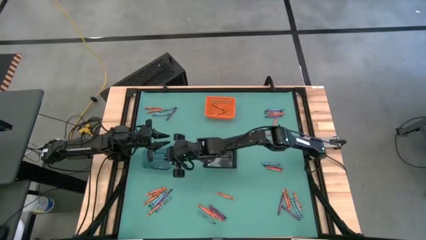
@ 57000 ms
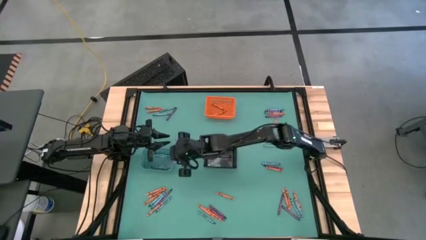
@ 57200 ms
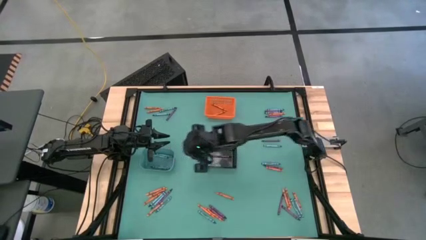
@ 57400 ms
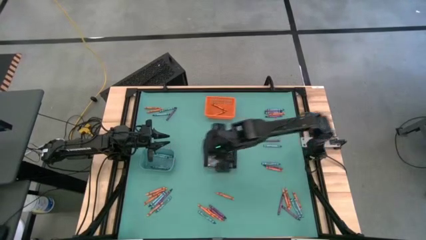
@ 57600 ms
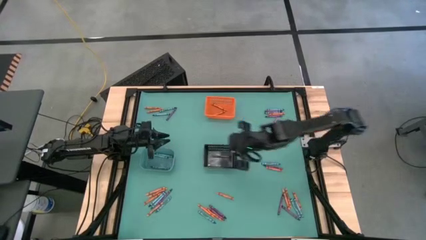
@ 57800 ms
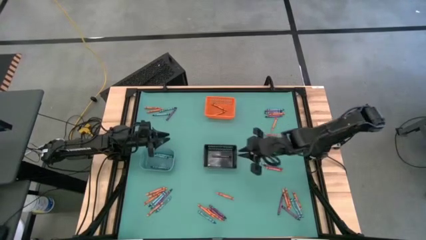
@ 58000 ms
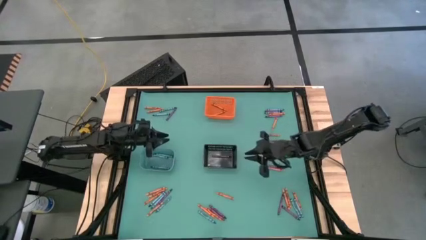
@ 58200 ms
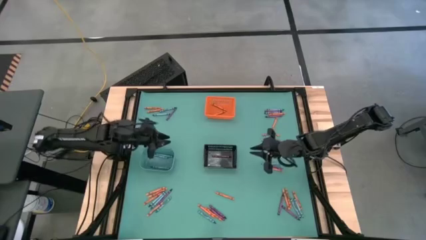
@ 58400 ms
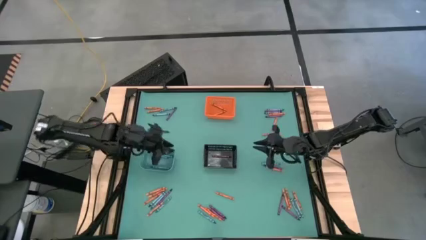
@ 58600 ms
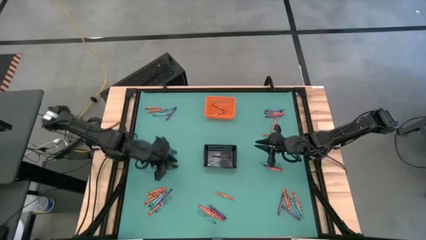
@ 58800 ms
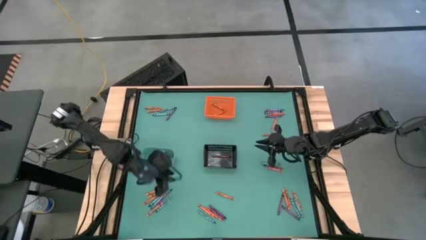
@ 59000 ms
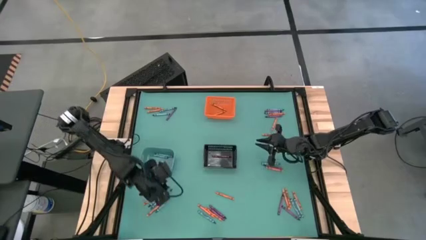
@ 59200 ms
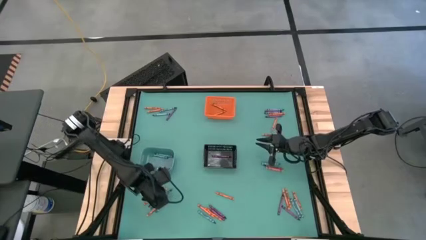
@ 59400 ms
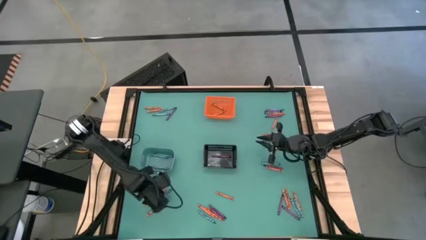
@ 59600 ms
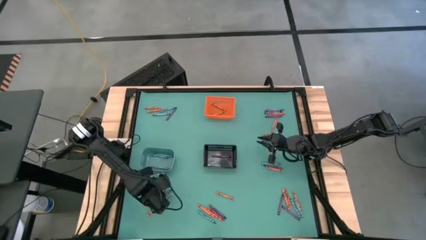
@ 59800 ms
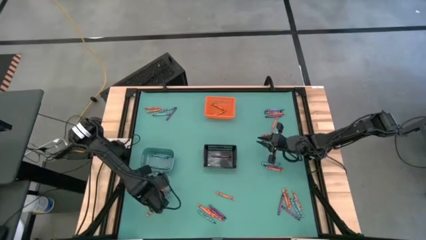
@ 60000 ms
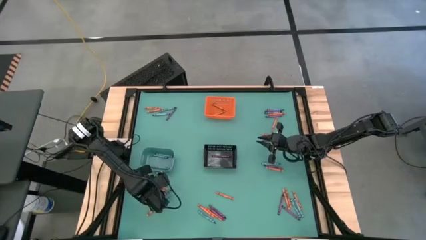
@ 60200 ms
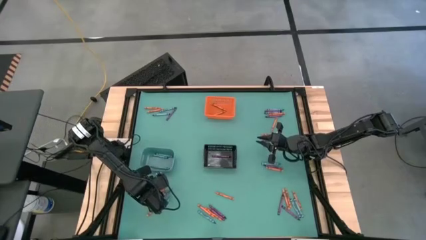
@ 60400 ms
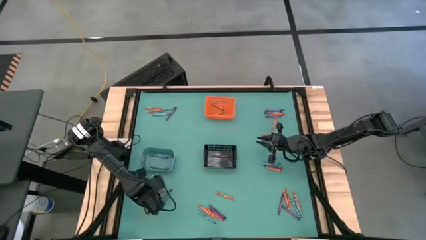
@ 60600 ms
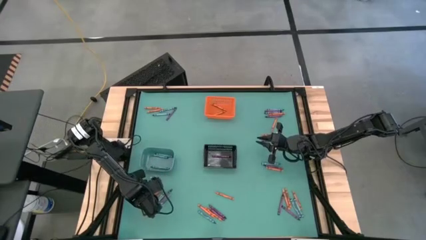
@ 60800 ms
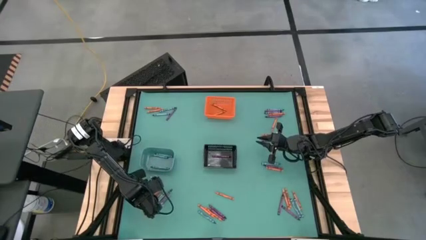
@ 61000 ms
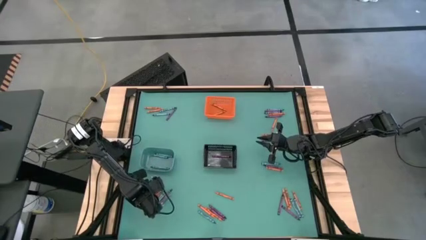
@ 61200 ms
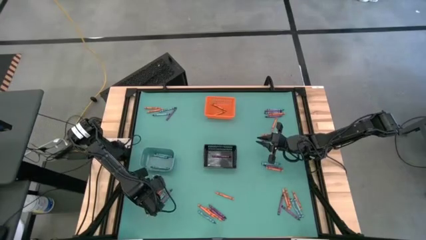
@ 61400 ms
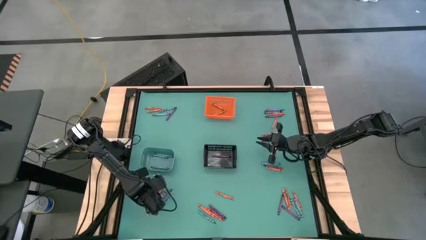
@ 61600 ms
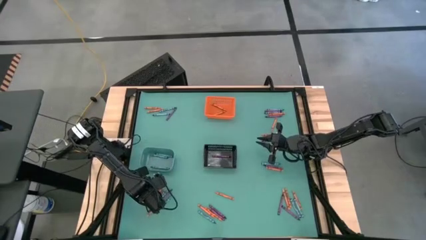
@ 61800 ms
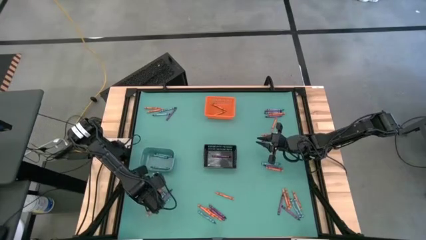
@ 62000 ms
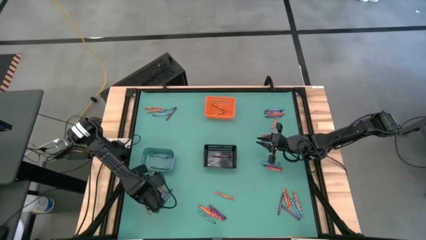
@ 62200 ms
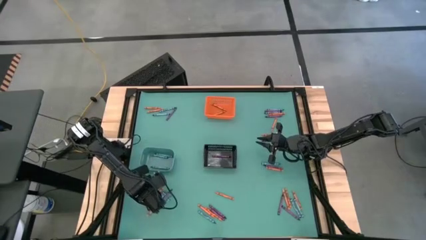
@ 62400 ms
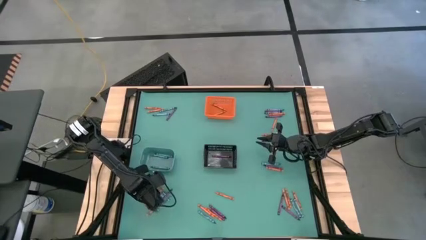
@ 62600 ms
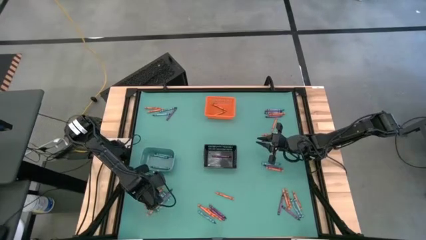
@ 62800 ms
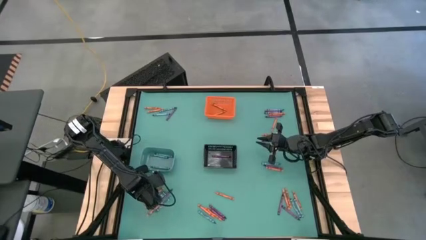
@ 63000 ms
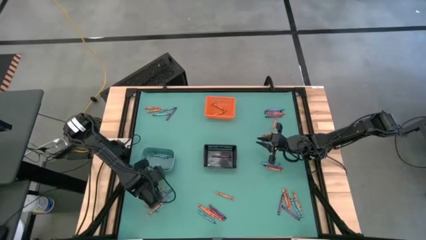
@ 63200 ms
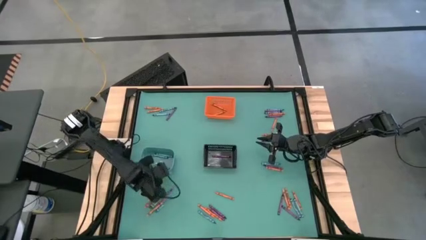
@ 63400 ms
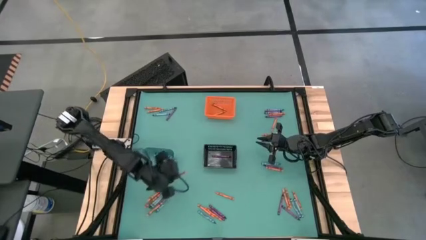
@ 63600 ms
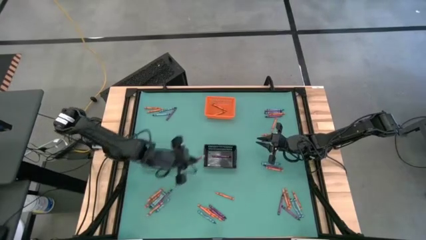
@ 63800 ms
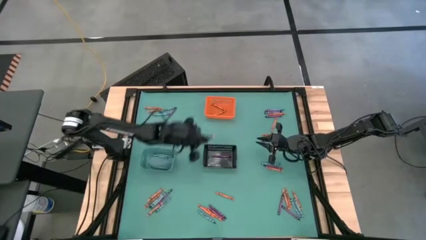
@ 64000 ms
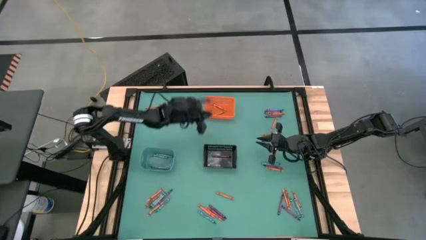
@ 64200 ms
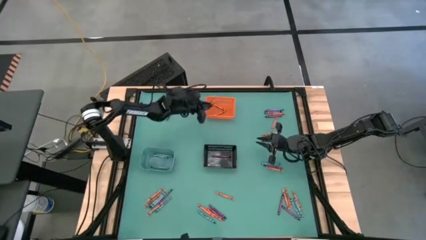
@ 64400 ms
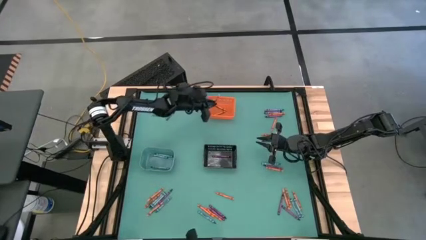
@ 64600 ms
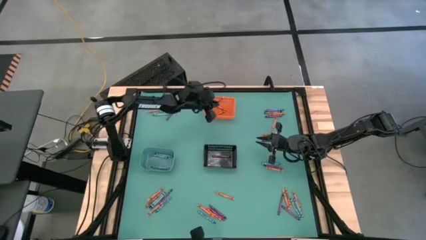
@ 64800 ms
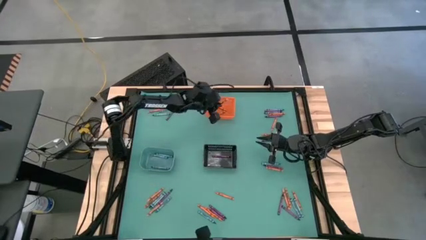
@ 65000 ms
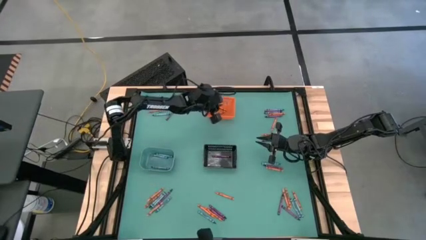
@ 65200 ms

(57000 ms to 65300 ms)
Task: Sort crayons
Put the orange crayon into the orange bin

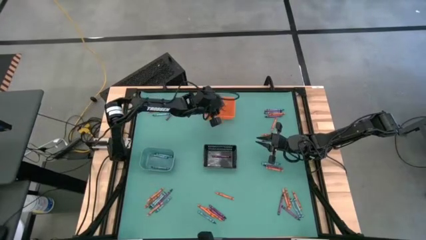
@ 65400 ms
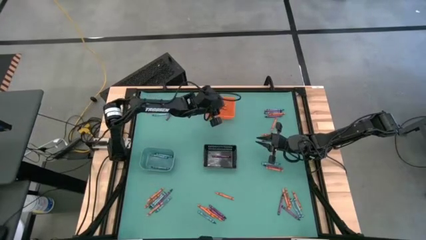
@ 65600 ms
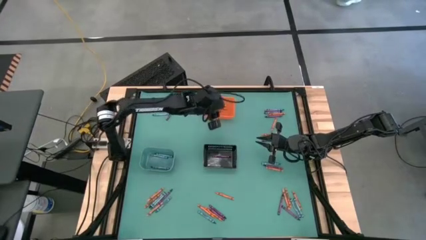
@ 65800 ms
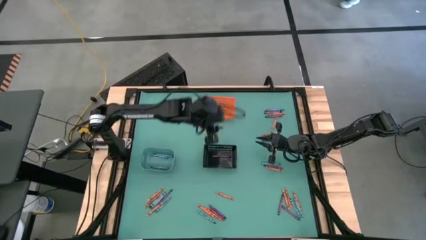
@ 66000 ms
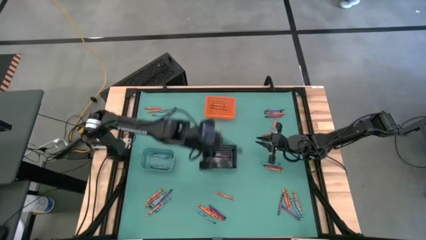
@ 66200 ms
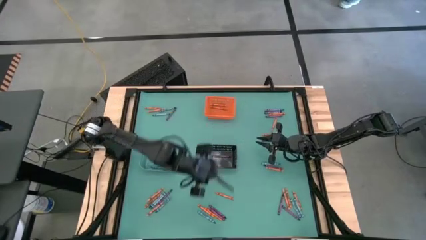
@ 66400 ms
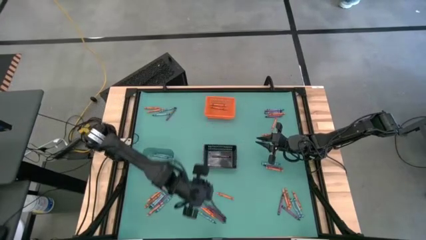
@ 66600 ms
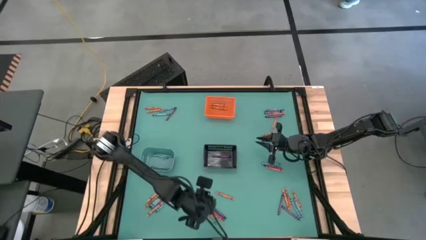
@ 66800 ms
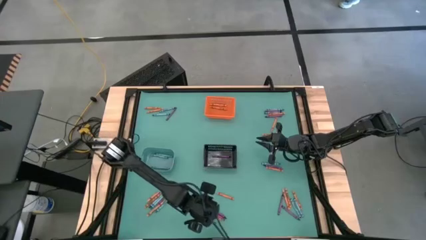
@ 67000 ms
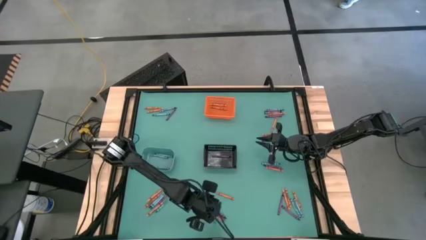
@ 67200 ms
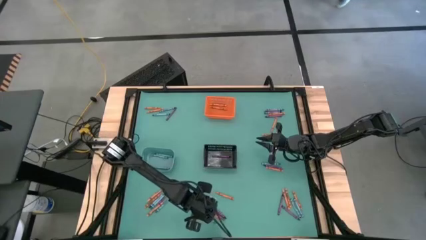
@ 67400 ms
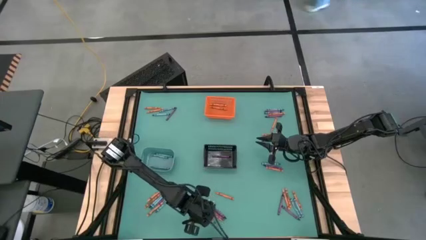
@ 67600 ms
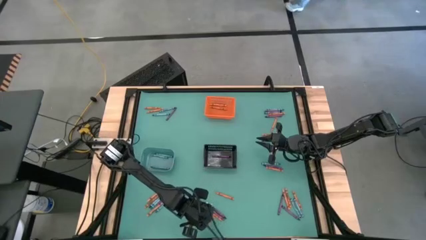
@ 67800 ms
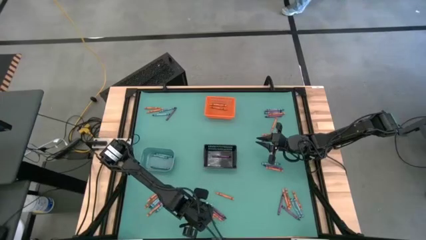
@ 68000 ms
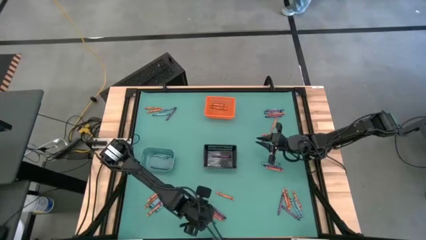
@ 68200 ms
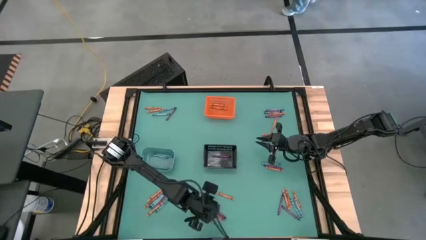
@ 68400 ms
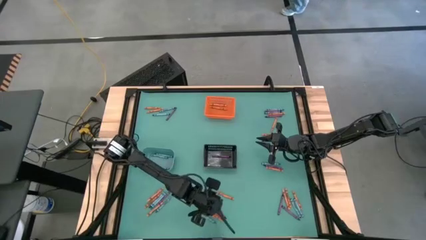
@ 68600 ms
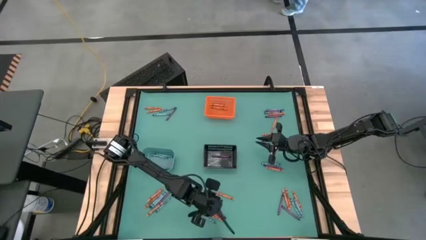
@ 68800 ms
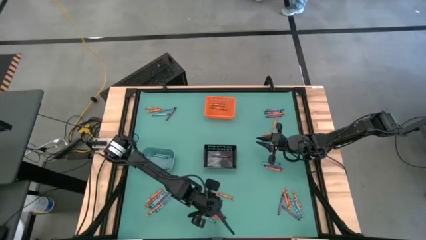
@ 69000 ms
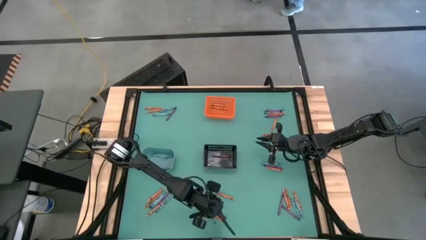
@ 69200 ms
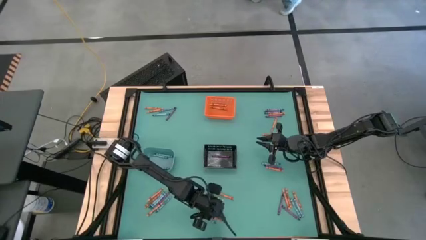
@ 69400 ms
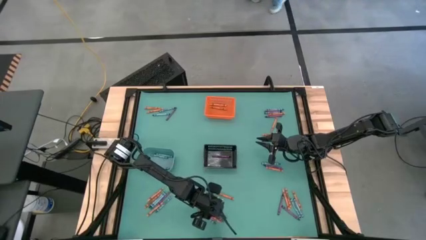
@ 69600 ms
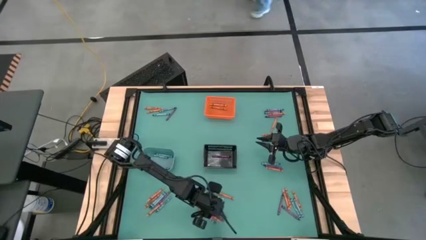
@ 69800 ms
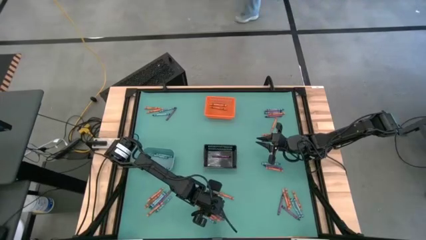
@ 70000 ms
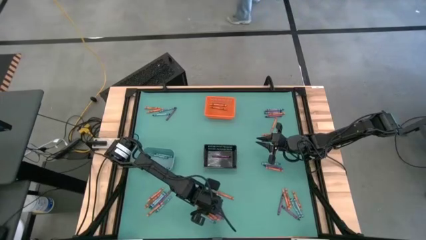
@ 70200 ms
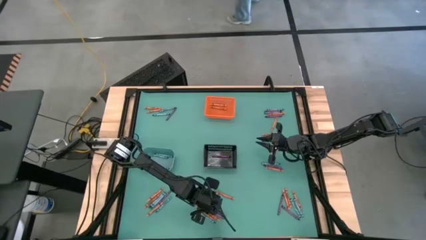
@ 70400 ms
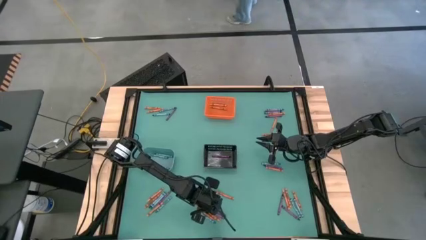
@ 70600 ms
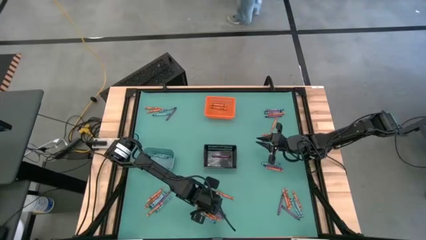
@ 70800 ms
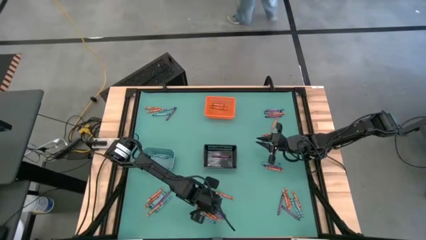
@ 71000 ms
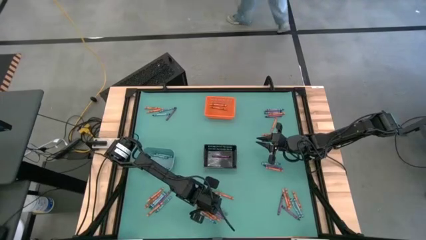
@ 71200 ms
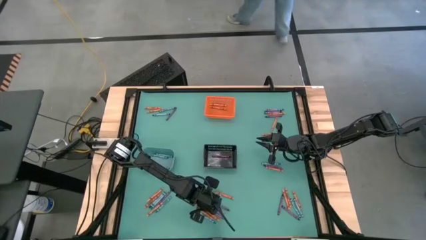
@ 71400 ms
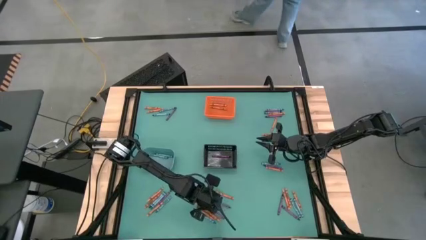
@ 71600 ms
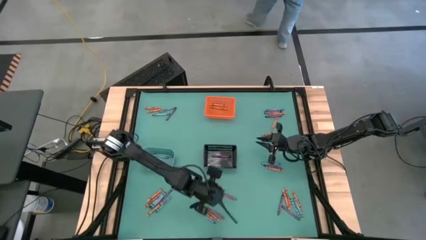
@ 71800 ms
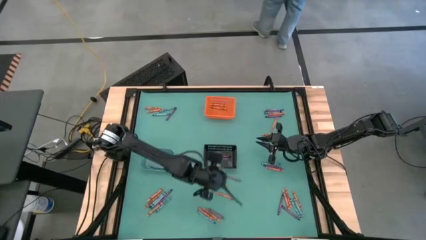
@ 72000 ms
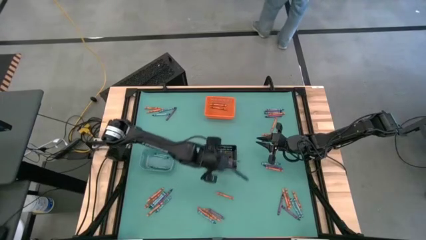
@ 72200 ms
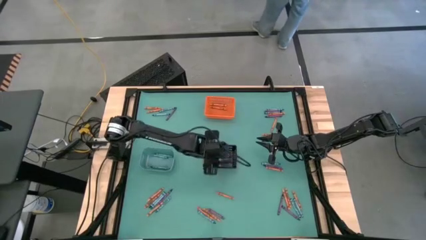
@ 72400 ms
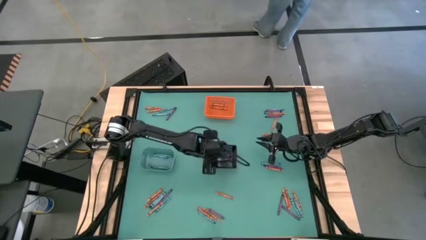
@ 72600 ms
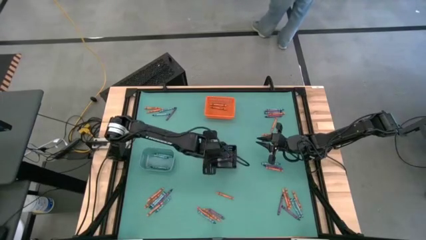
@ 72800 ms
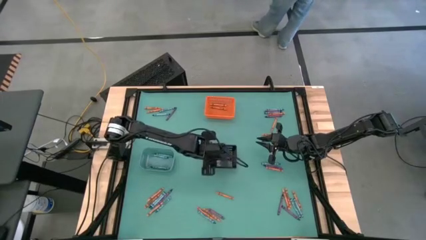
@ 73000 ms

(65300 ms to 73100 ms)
Put the violet crayon into the black bin
